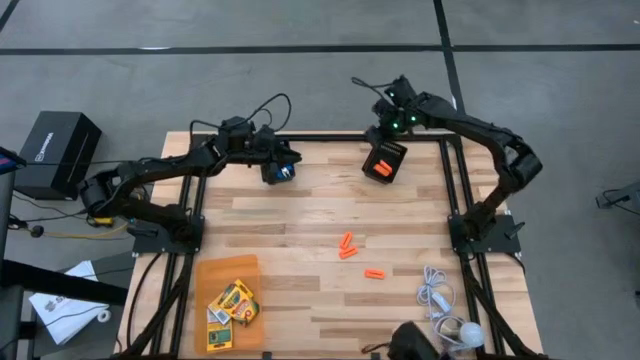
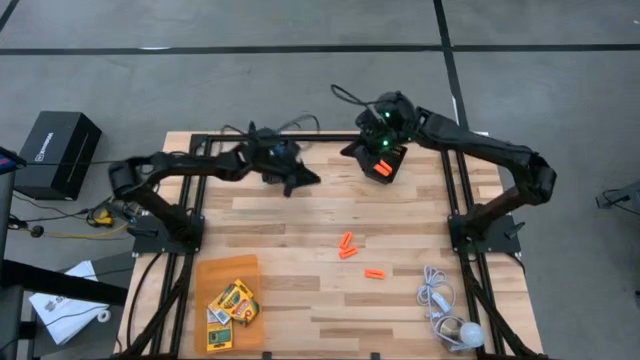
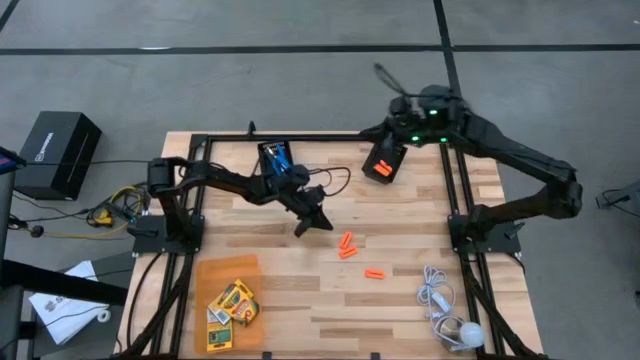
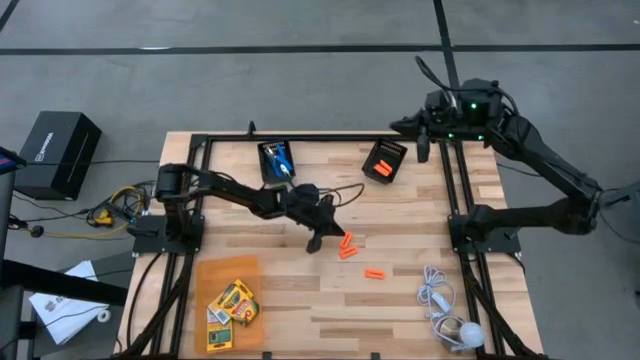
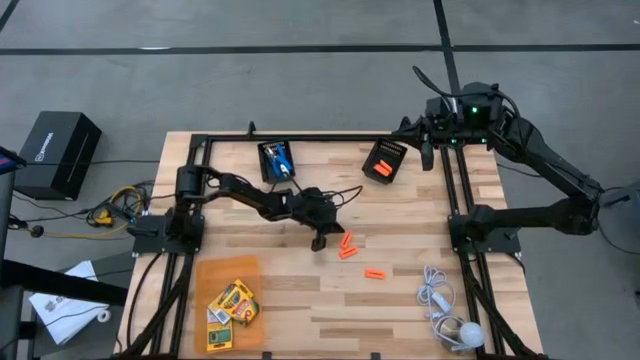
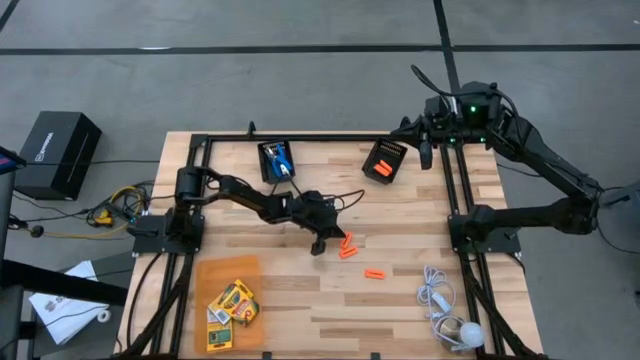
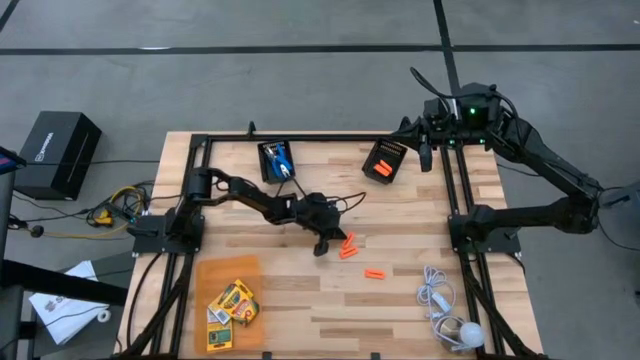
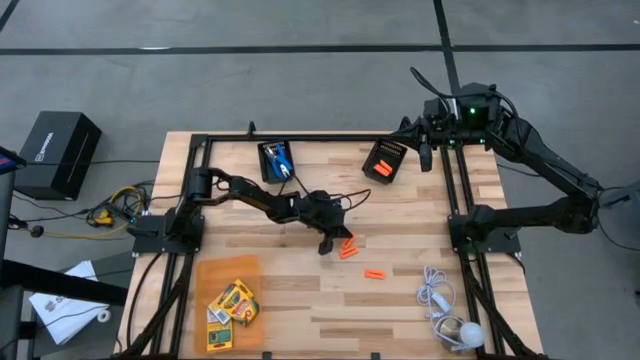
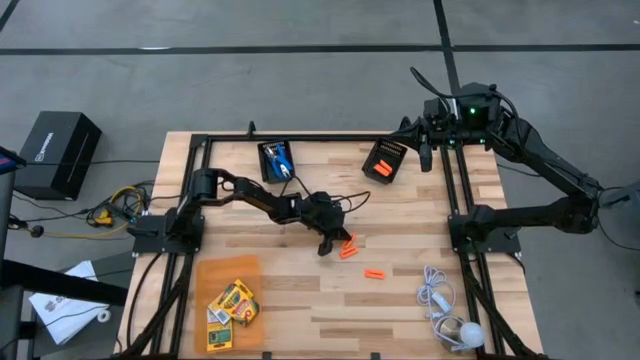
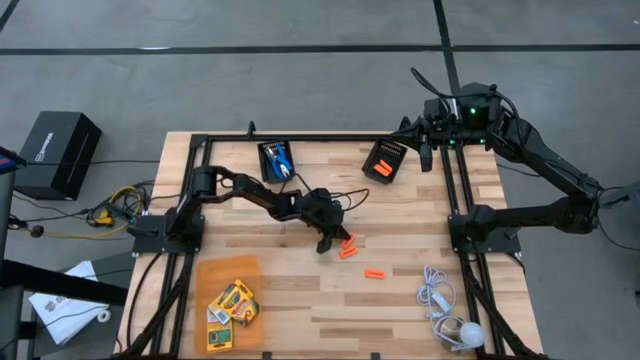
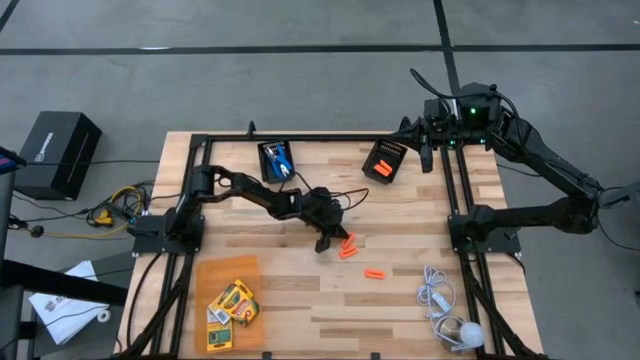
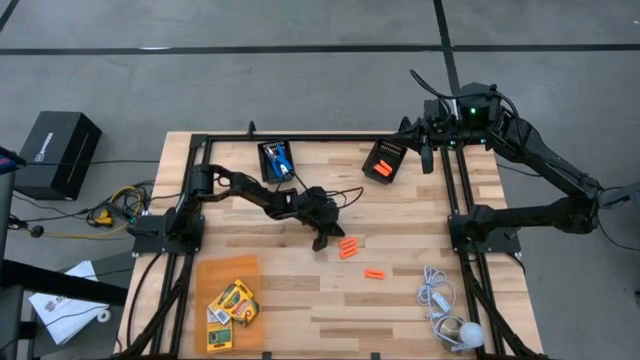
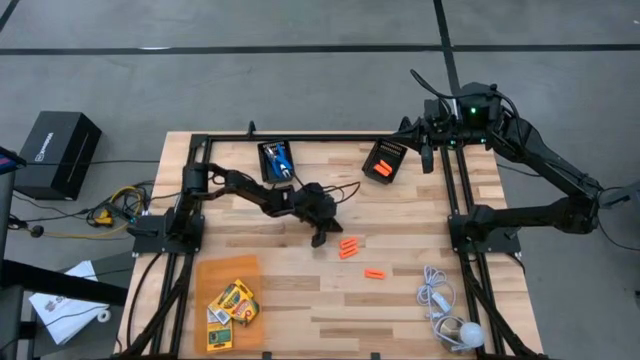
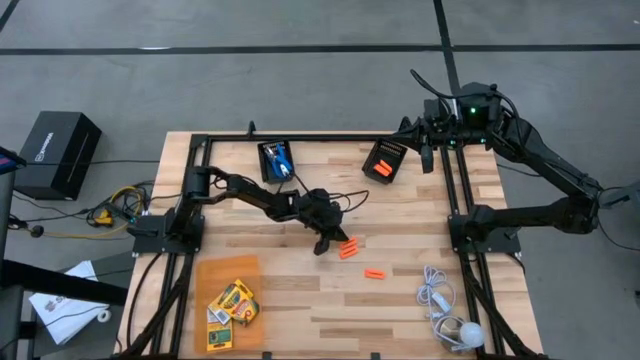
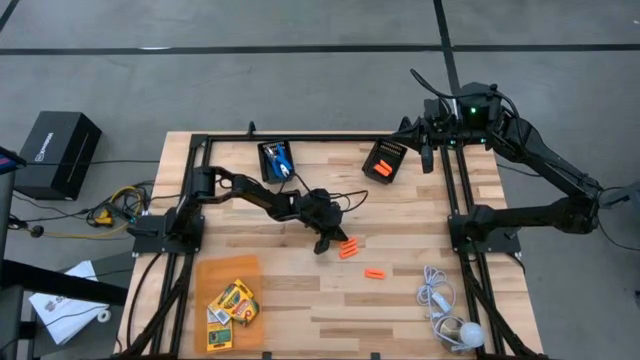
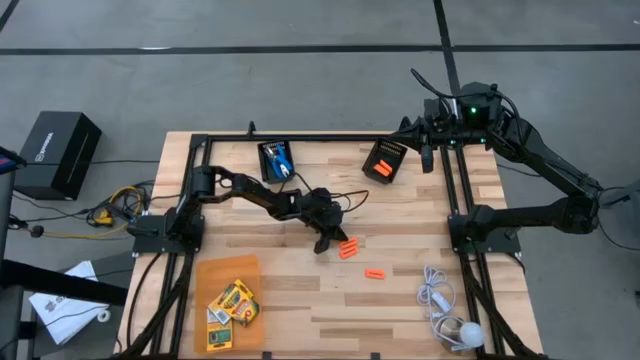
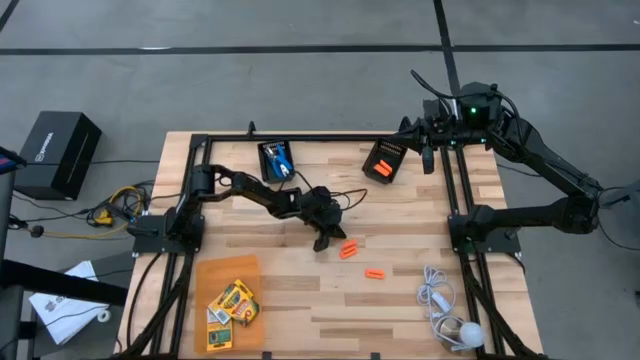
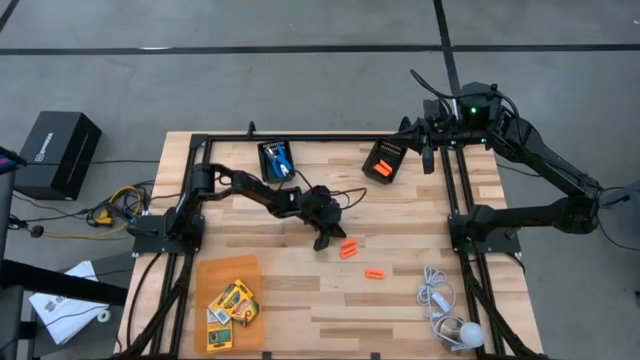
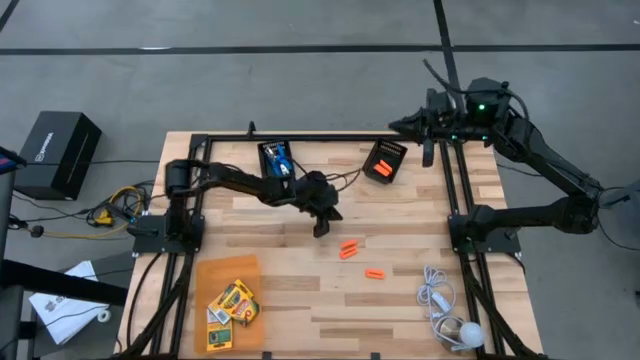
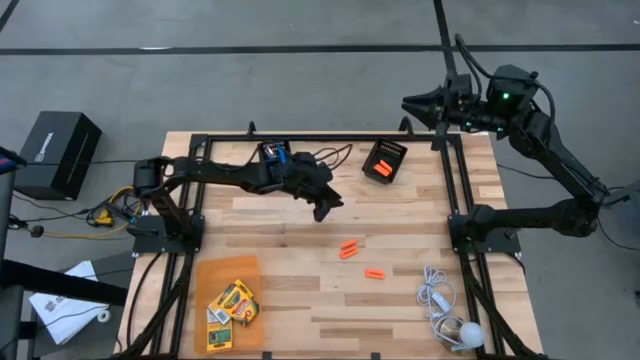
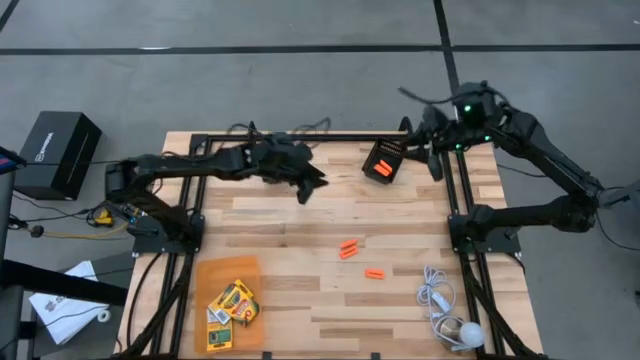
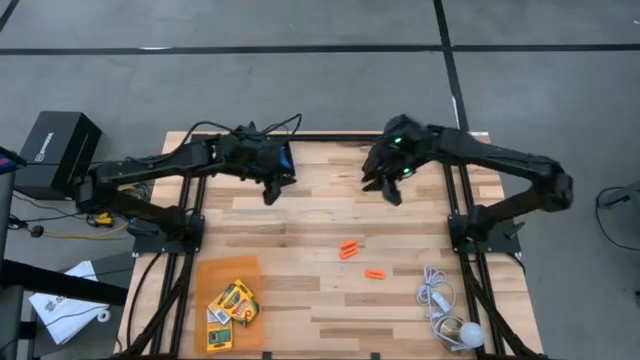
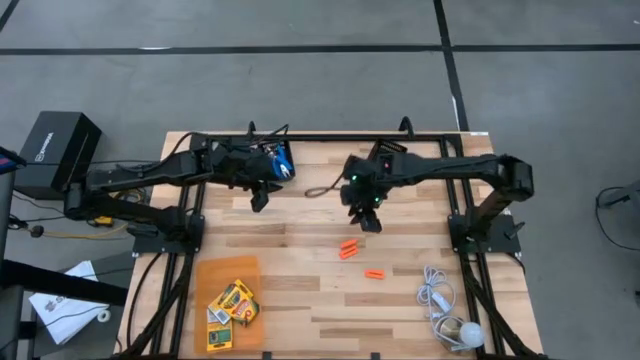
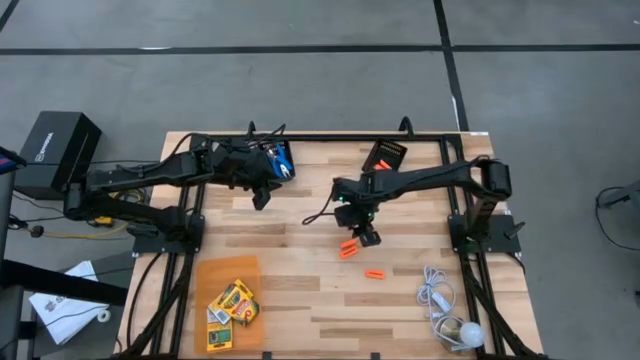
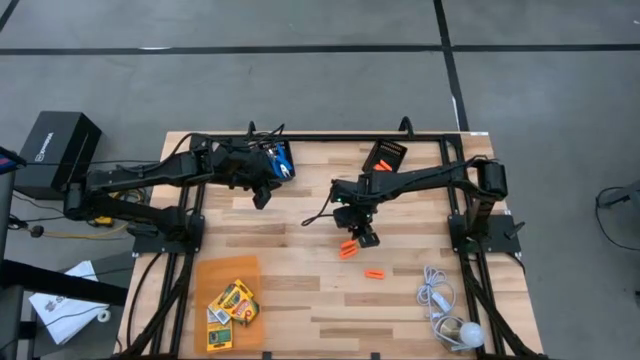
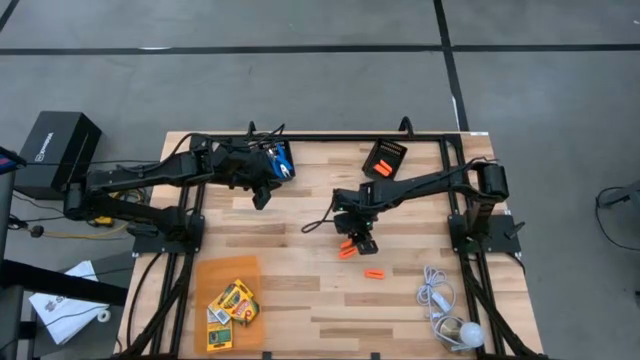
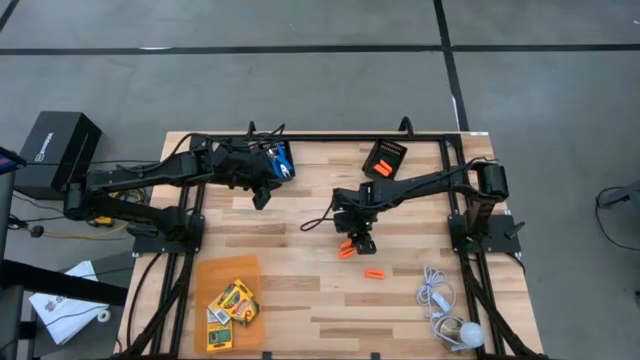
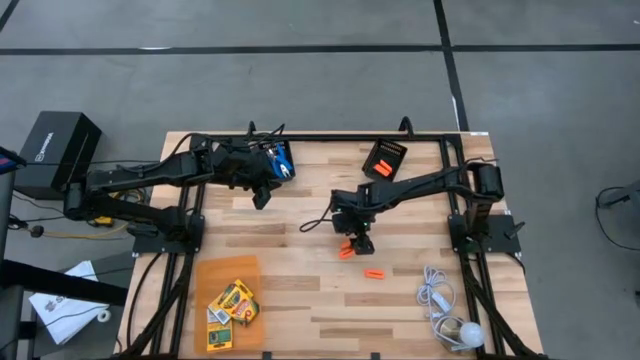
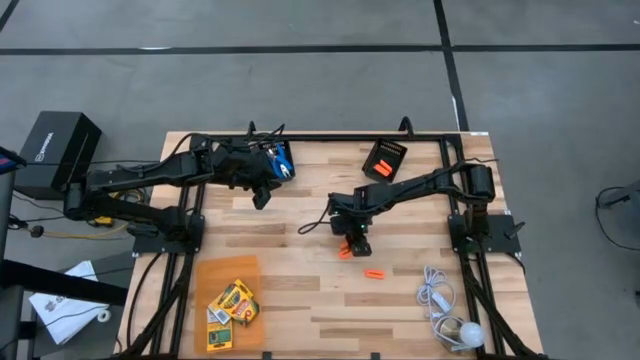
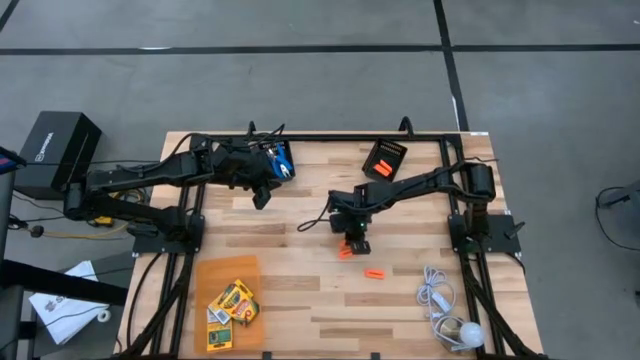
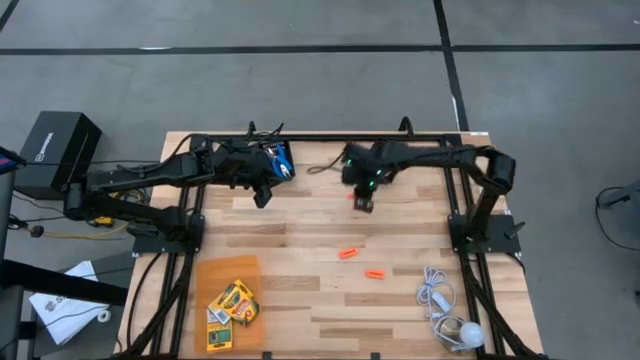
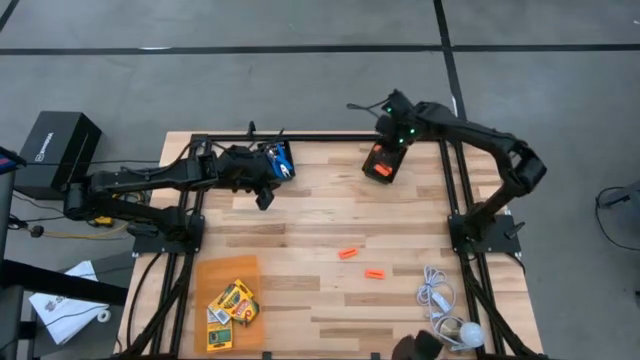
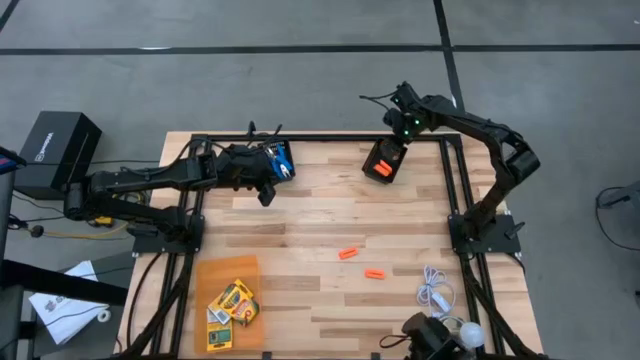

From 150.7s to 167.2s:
Task: Pick & Place School Supplies
Put the orange eraser into the right black bin

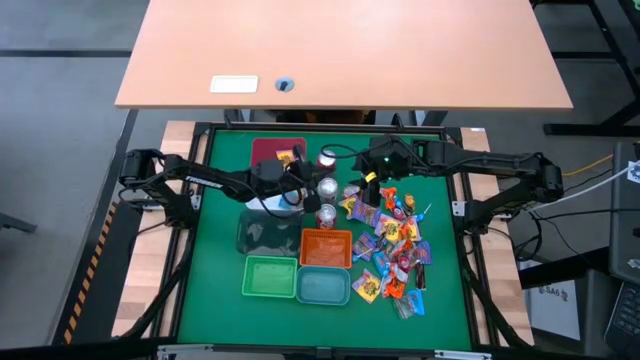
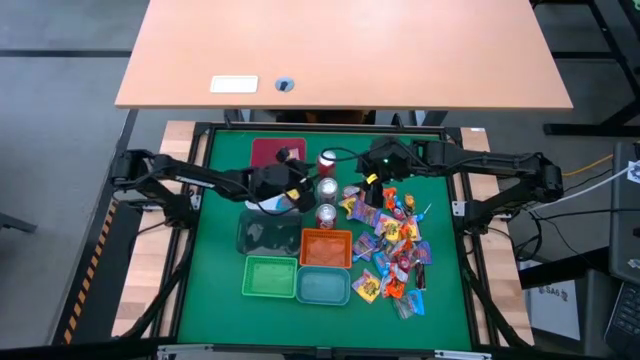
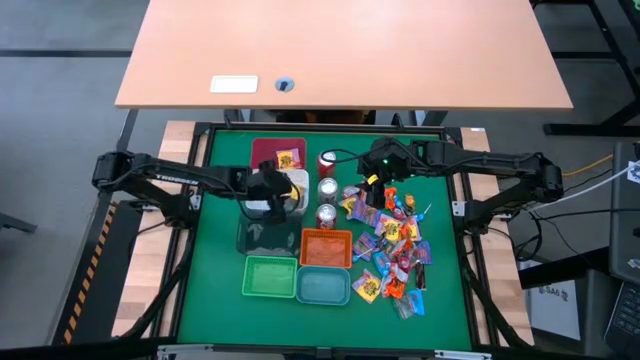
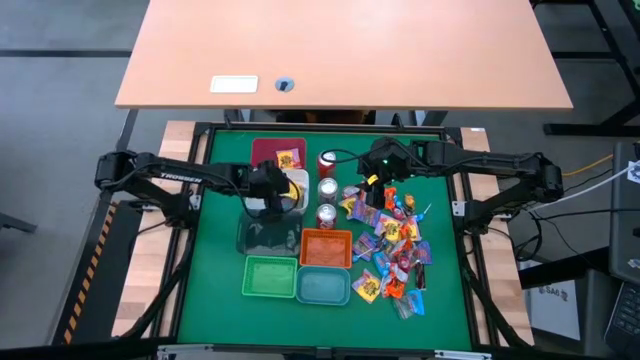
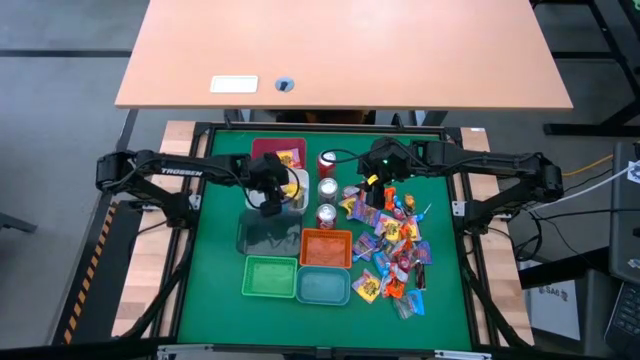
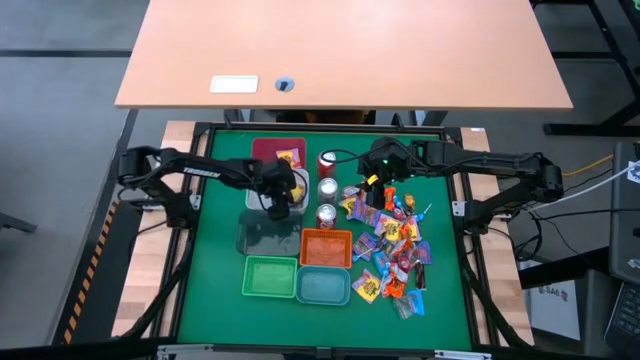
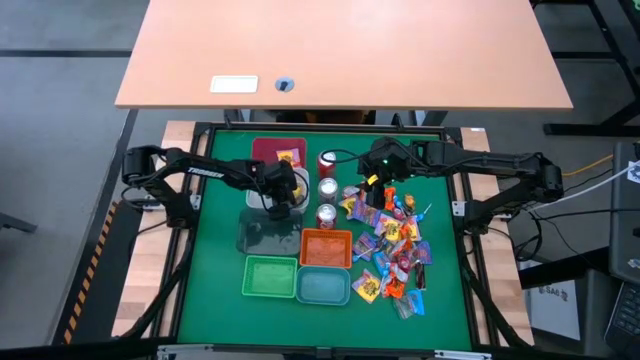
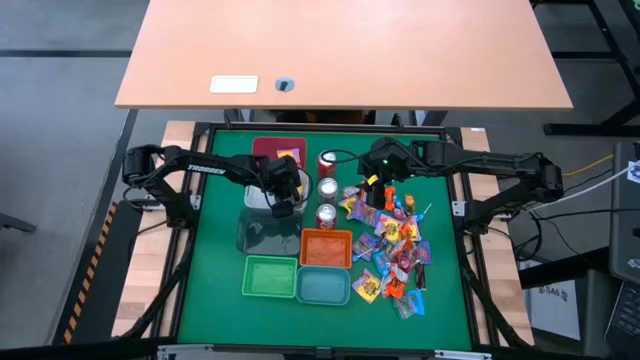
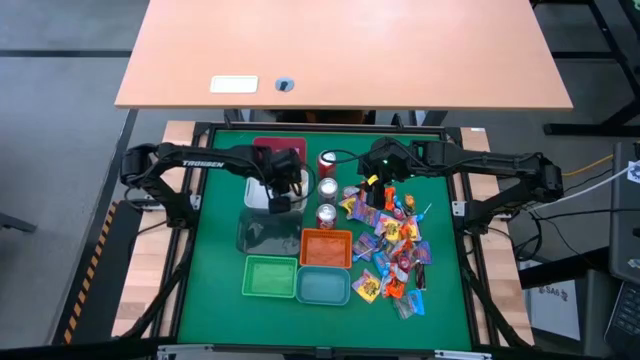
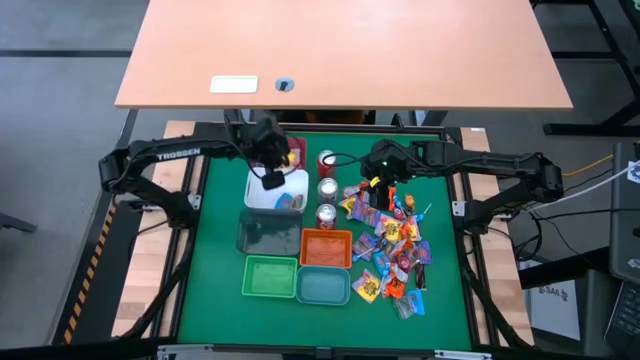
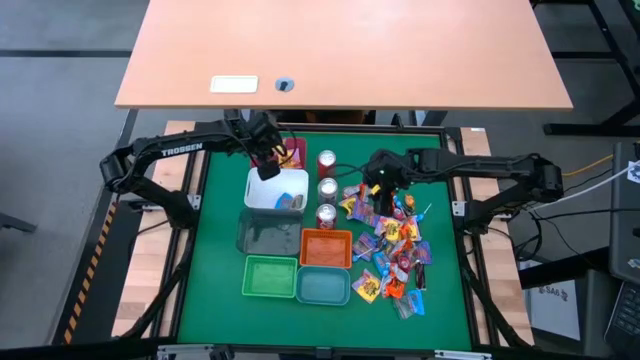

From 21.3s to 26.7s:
Task: Sort candy
Put the yellow candy into the red bin
